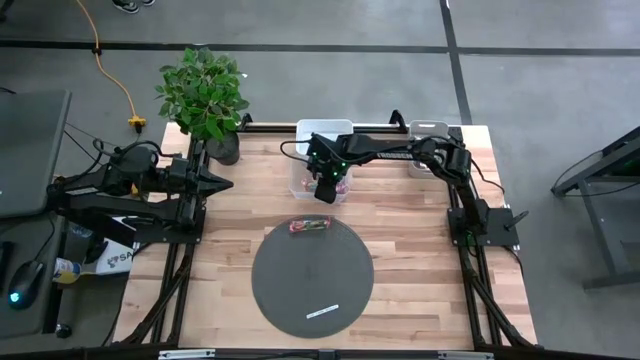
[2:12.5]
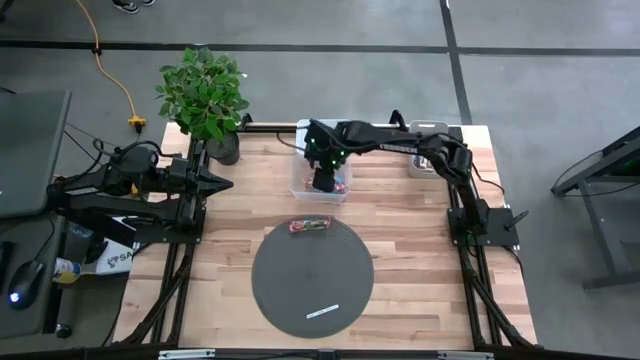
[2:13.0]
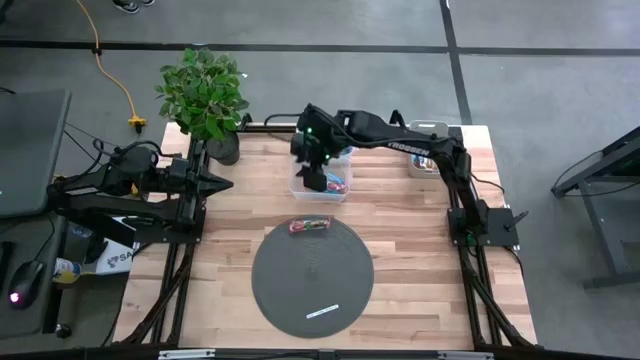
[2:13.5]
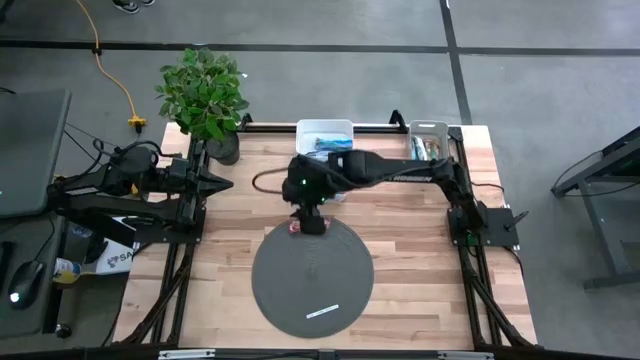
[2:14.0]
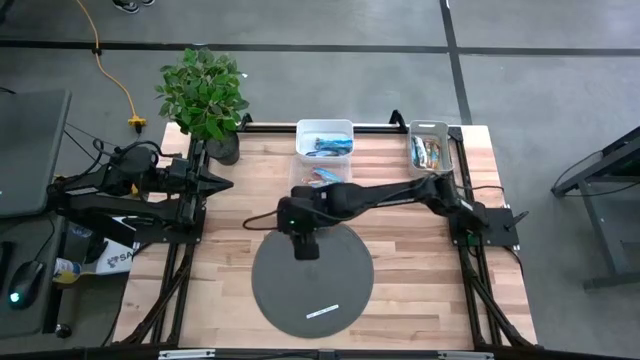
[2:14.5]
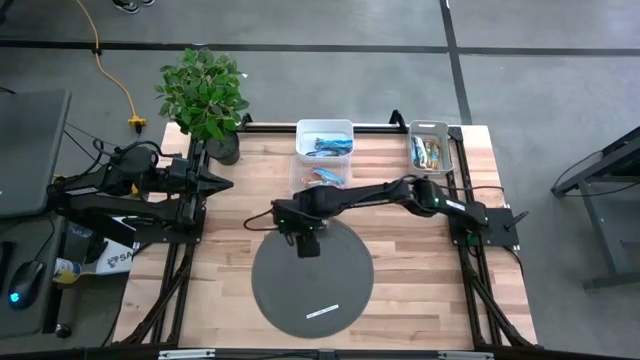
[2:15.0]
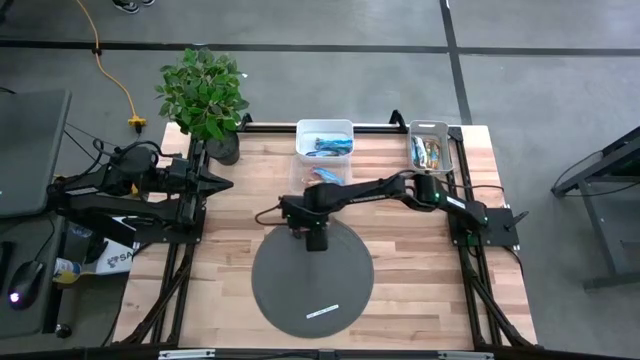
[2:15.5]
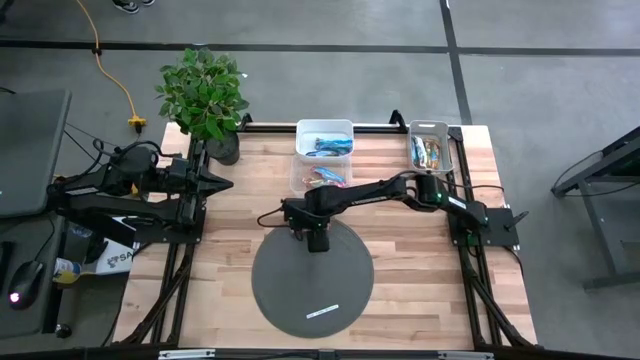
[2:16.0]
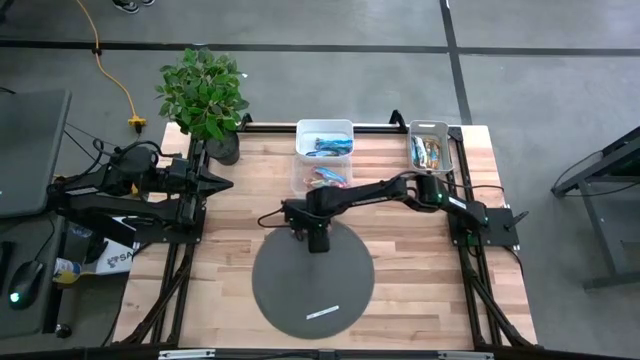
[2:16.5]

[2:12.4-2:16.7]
Task: Pick and place Granola Bars by type
Put the red granola bar into the transparent bin

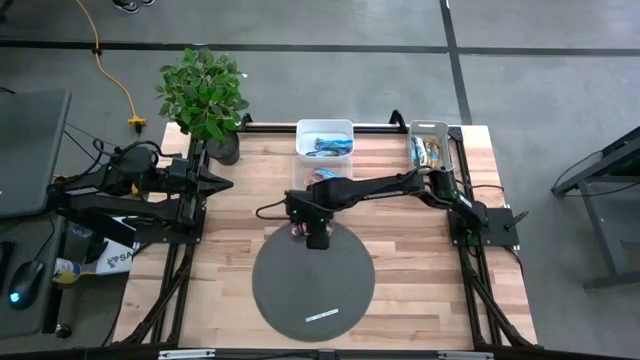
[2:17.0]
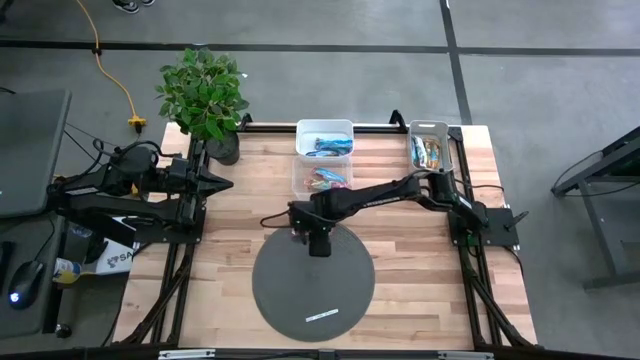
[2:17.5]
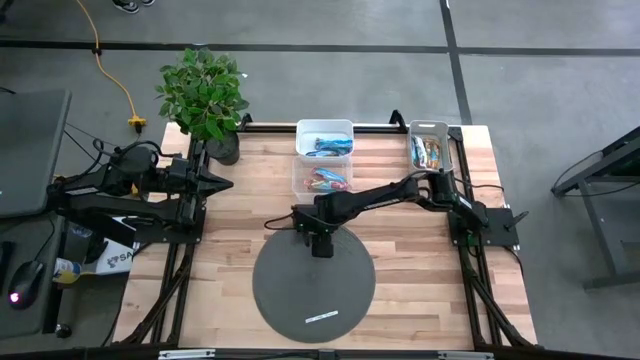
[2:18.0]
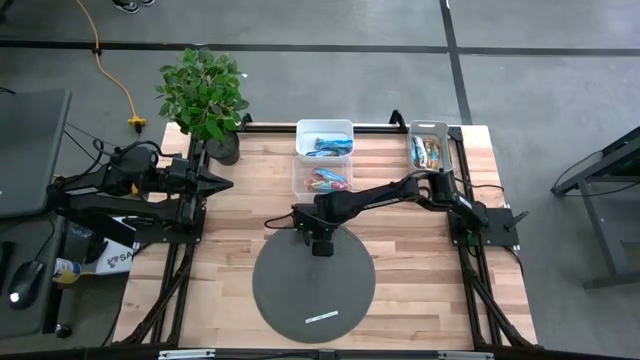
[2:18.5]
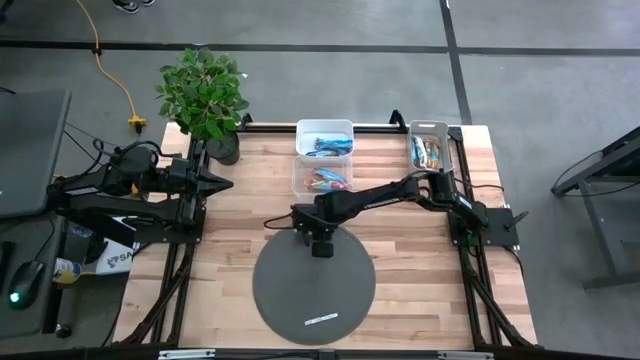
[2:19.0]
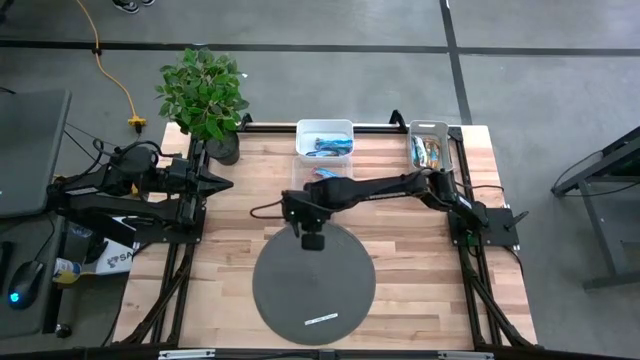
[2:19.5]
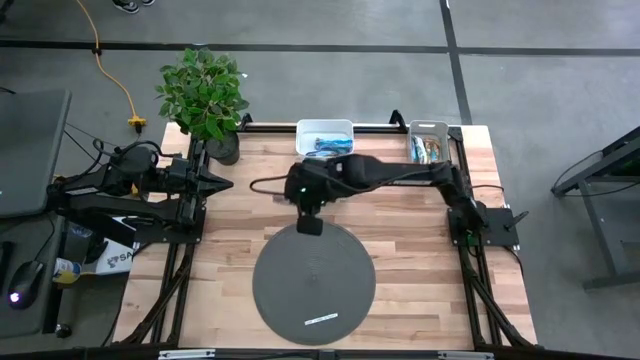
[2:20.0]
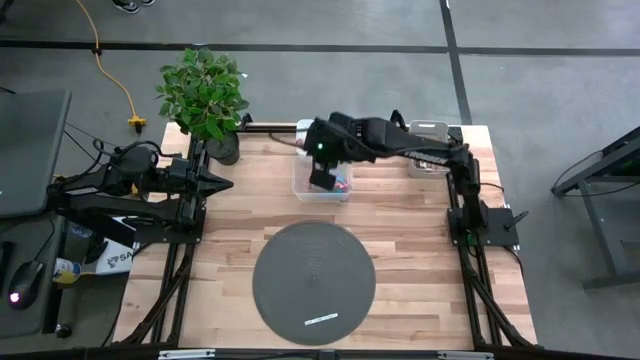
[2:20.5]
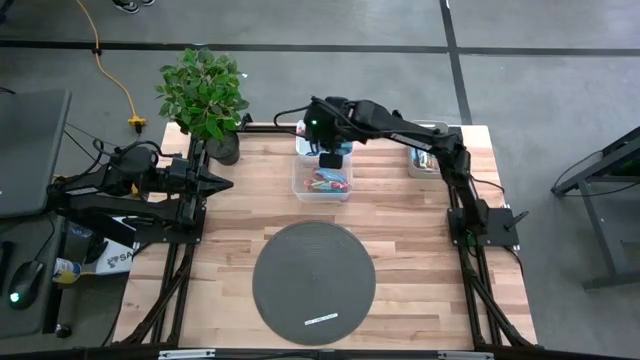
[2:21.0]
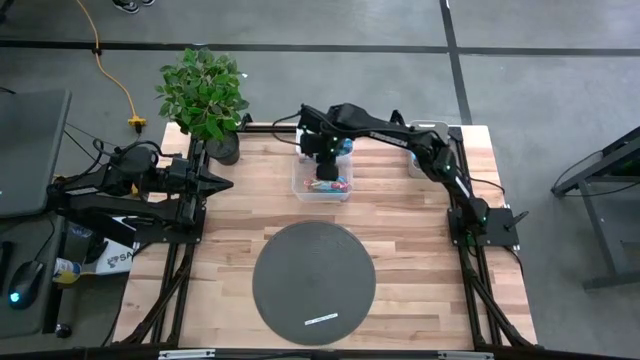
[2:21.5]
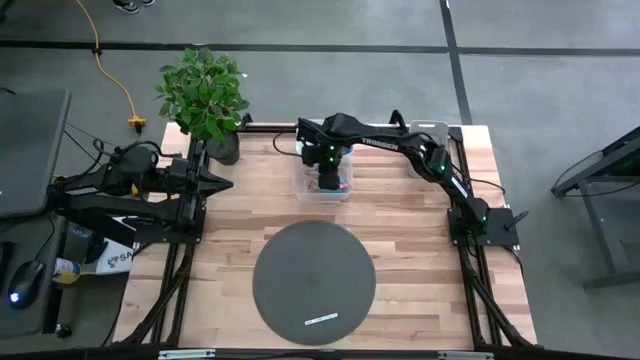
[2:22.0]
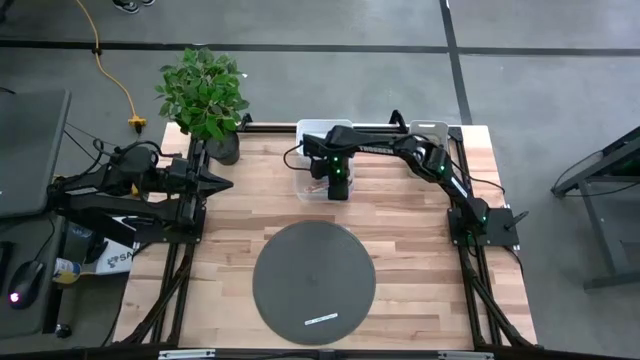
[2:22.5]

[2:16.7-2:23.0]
Put the red granola bar into the transparent bin

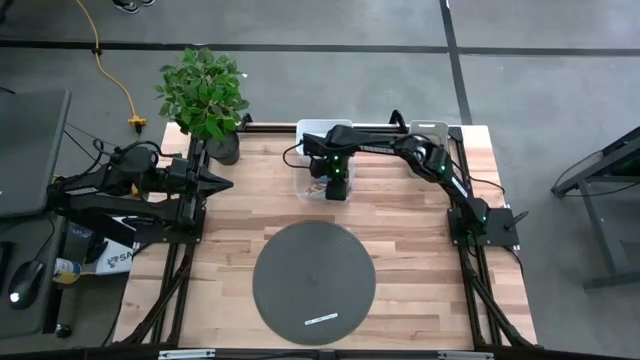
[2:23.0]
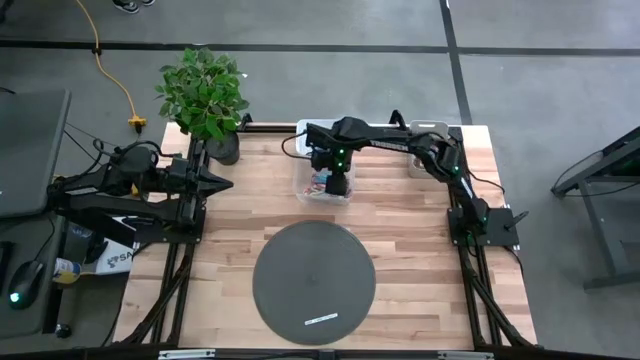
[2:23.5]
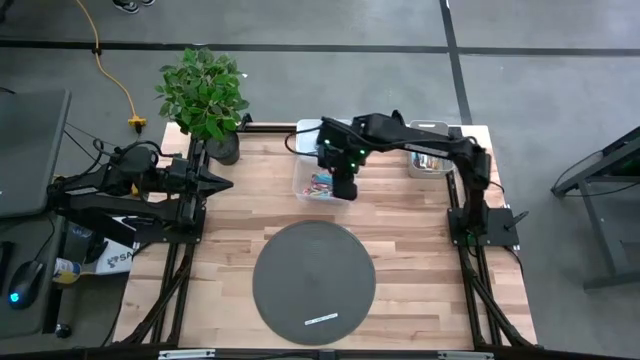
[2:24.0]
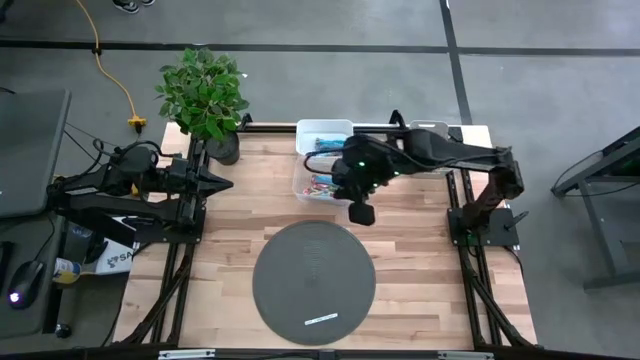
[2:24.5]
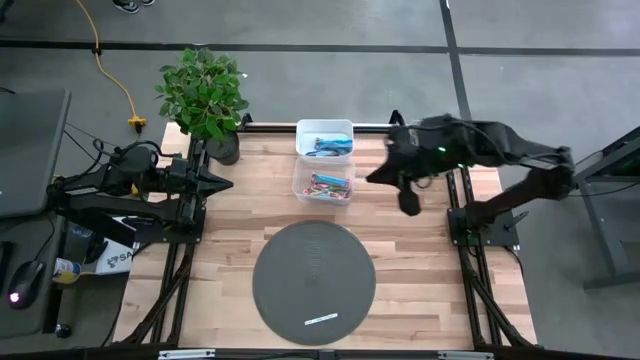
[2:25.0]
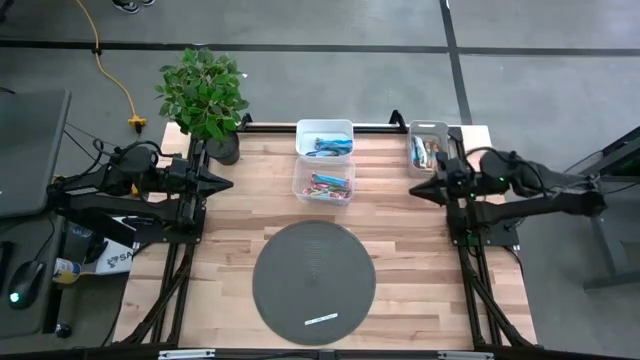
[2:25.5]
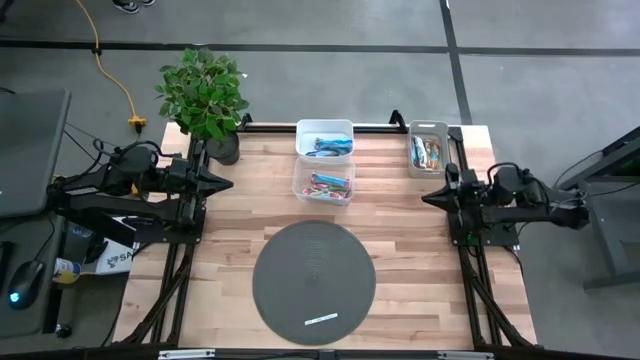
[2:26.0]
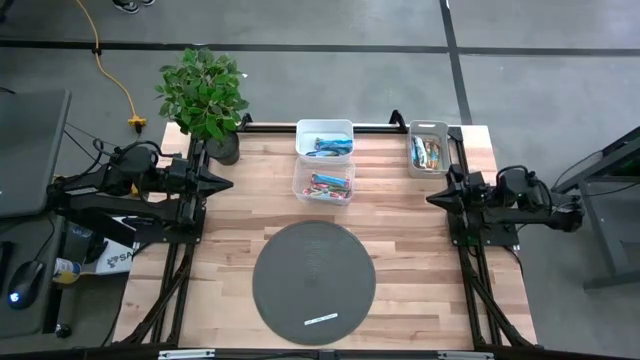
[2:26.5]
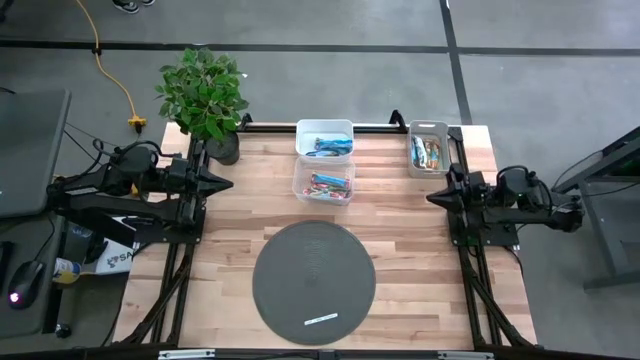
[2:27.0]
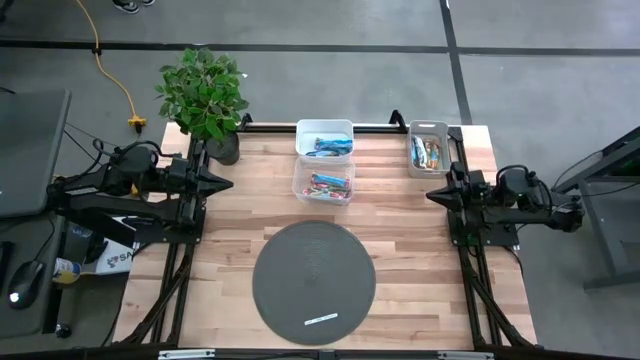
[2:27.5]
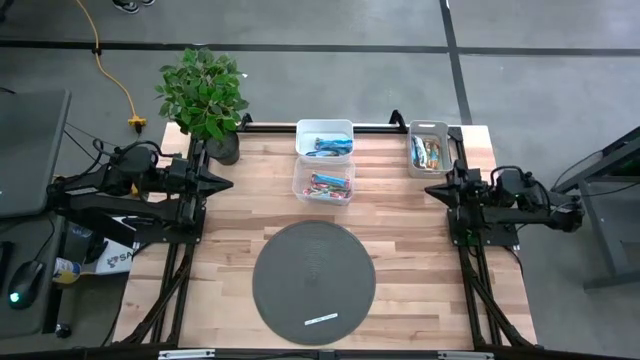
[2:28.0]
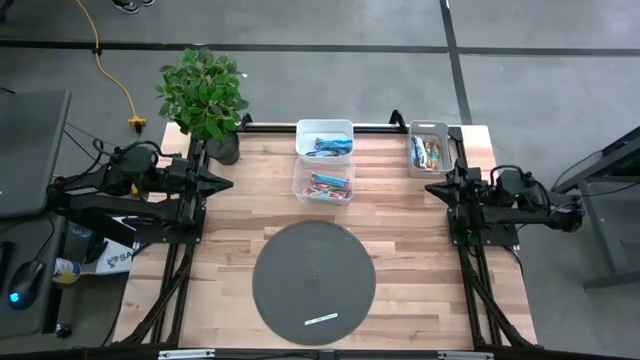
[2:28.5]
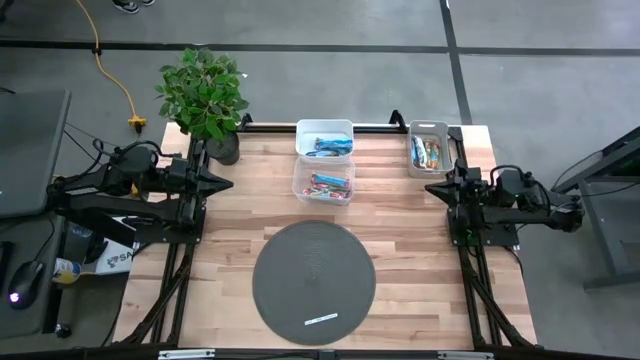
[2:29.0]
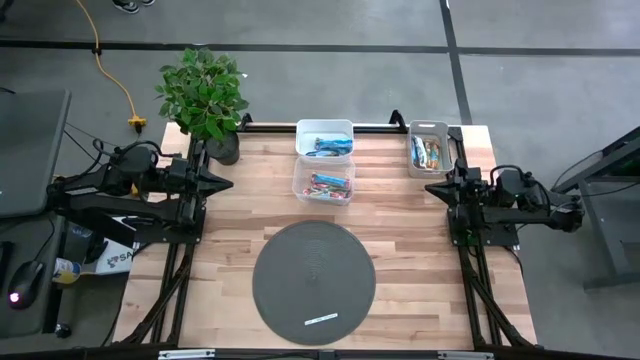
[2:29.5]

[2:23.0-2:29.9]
Return to Home Position
